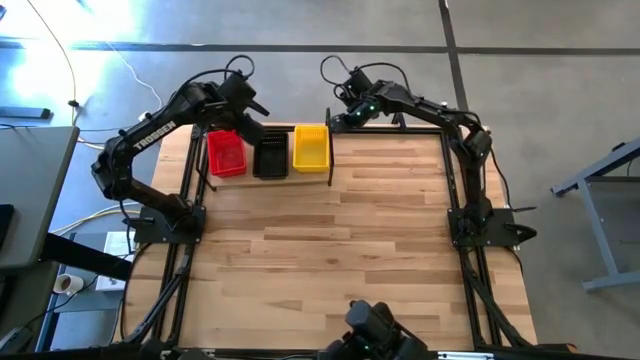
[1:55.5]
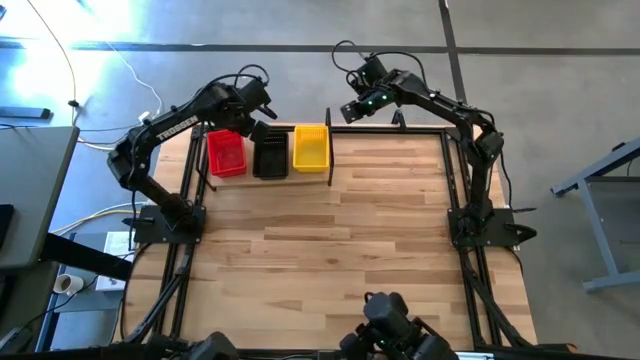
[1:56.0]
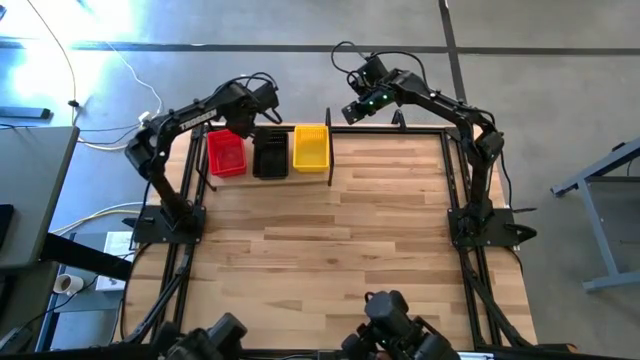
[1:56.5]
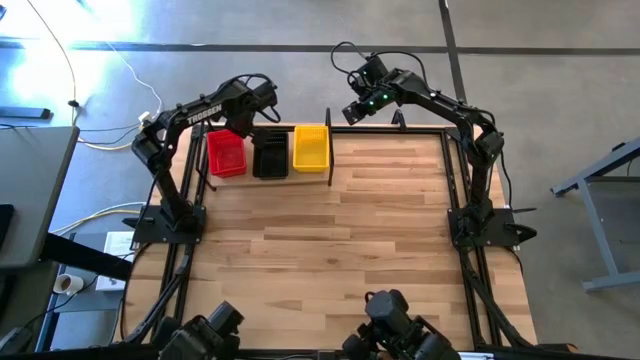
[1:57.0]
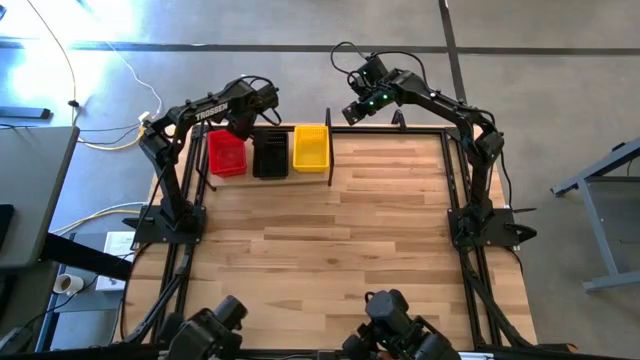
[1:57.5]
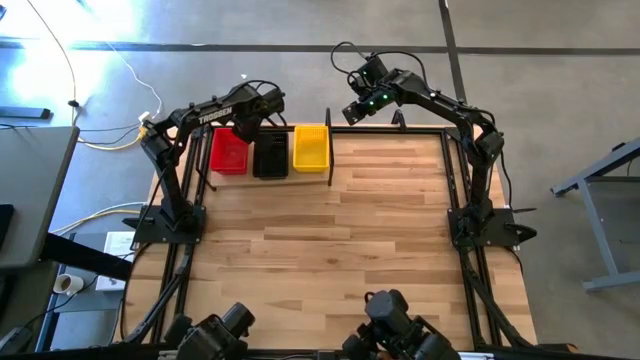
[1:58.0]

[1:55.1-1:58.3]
Task: Stack baskets on shelf by color
Adjust the stacked red bins on the shelf

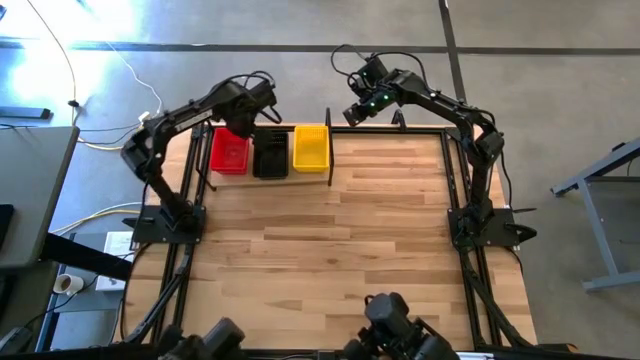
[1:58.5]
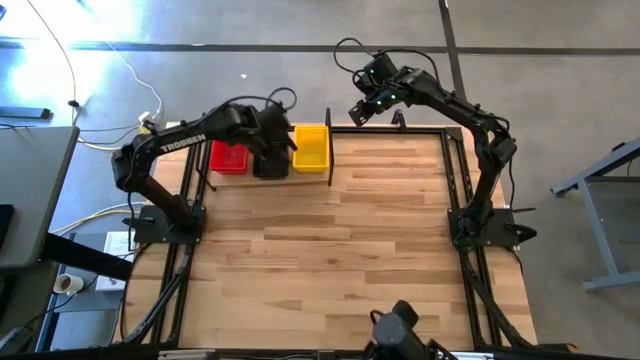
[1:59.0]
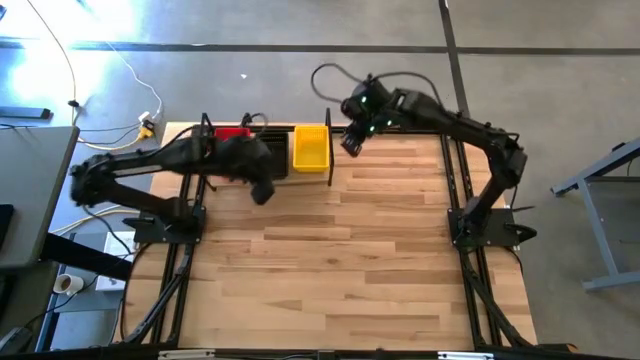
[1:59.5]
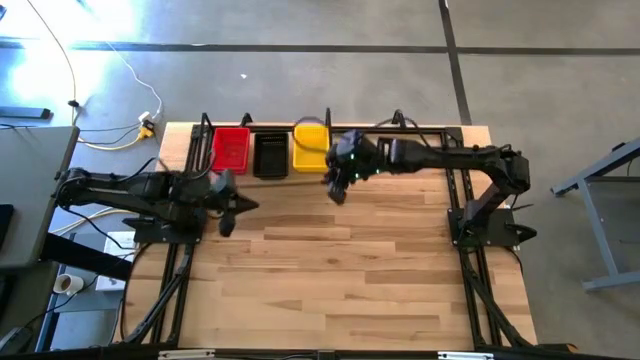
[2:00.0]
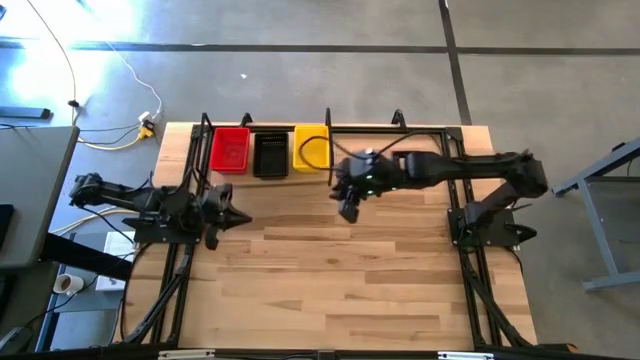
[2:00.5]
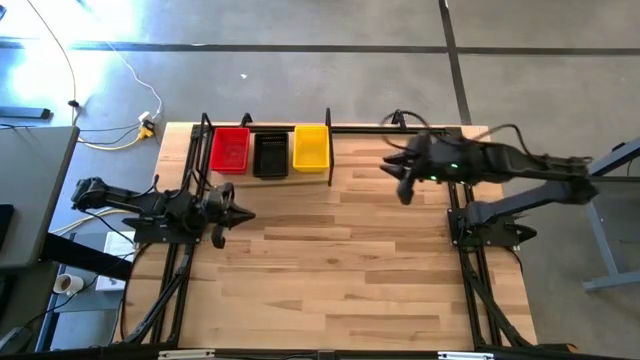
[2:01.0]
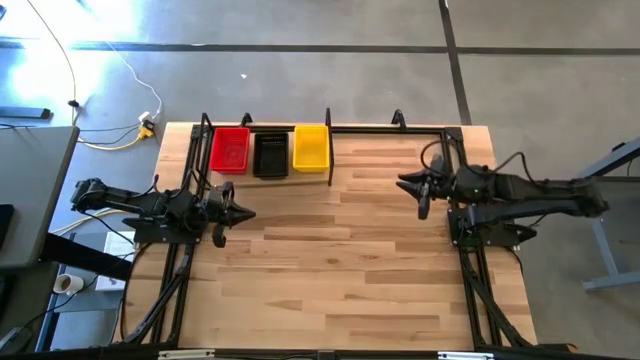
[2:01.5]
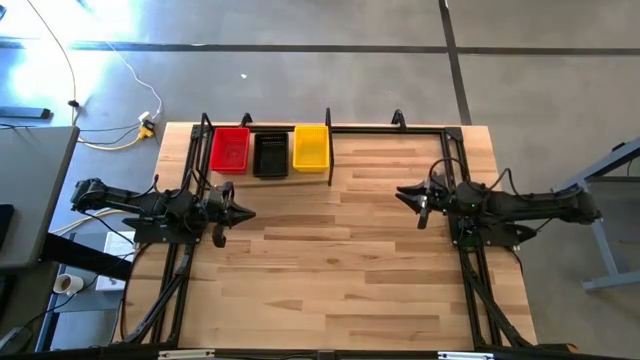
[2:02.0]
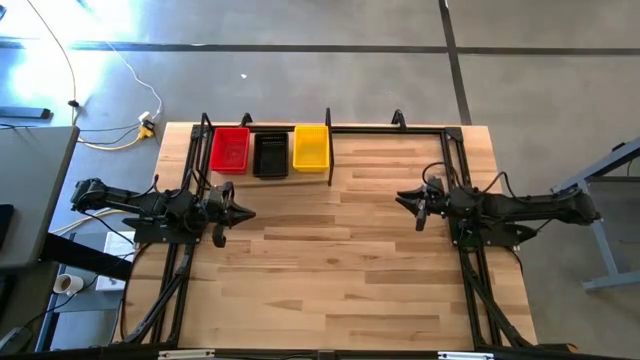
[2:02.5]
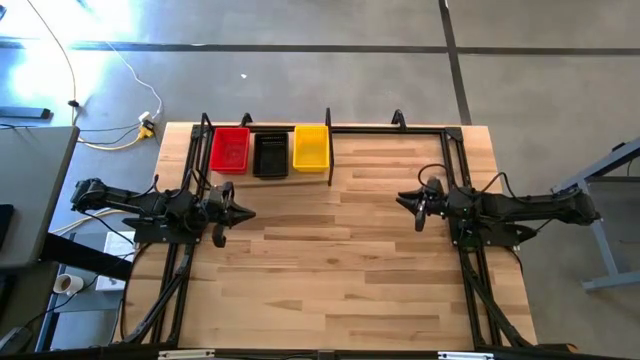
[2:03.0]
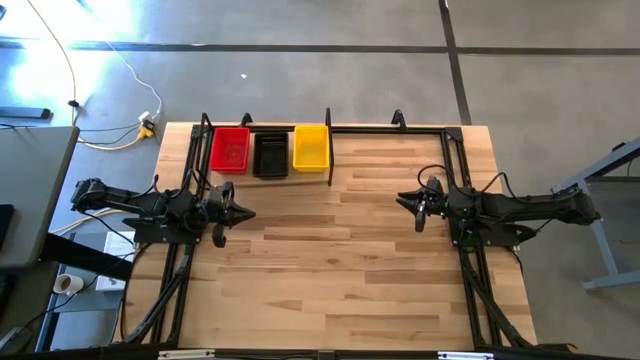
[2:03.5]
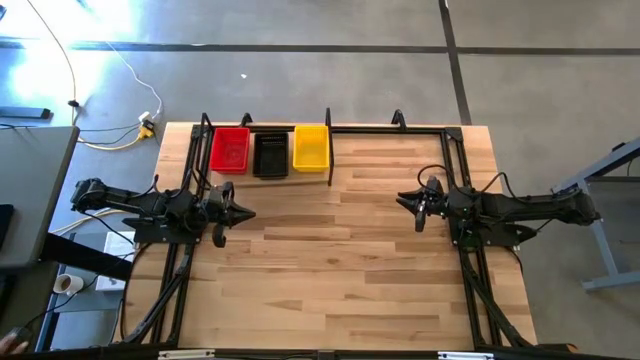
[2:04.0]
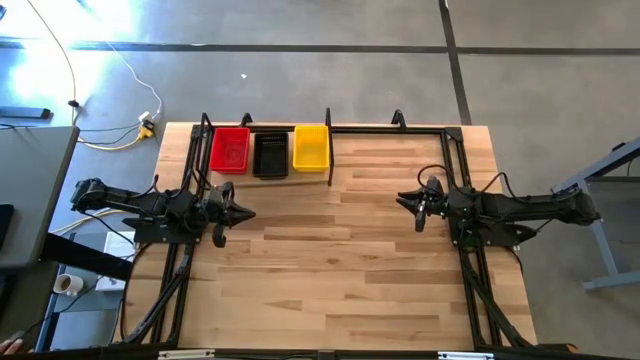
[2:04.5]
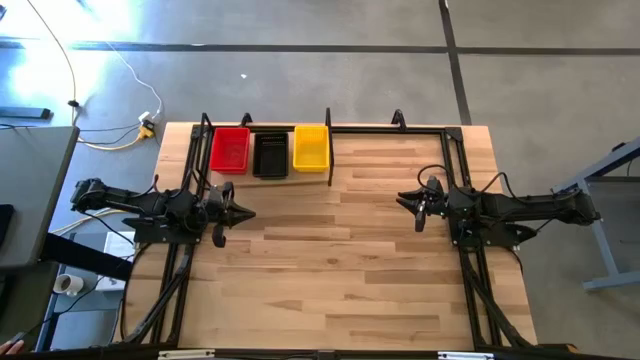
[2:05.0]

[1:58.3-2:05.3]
Return to Home Position

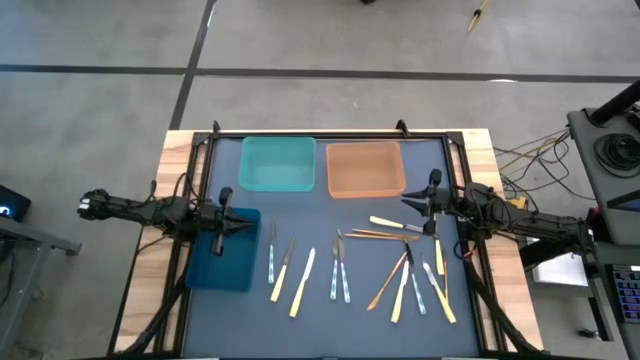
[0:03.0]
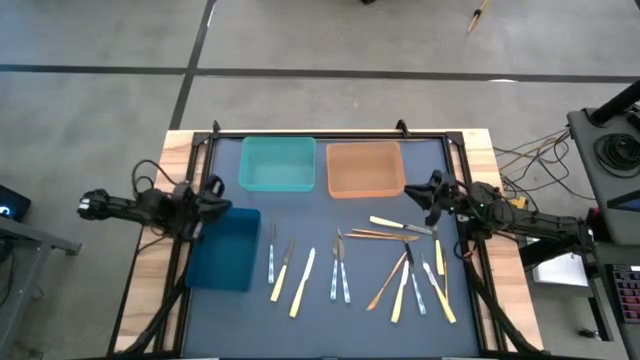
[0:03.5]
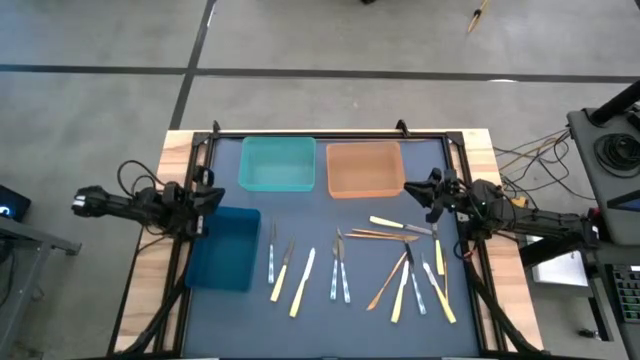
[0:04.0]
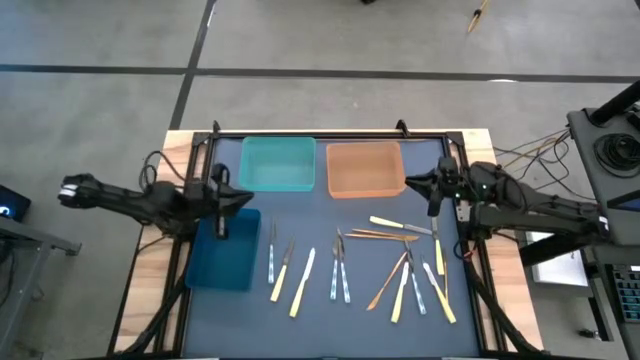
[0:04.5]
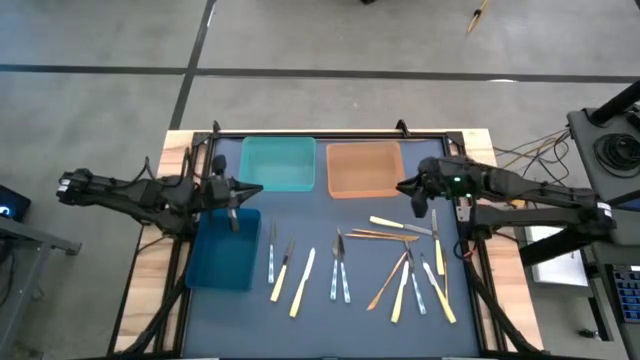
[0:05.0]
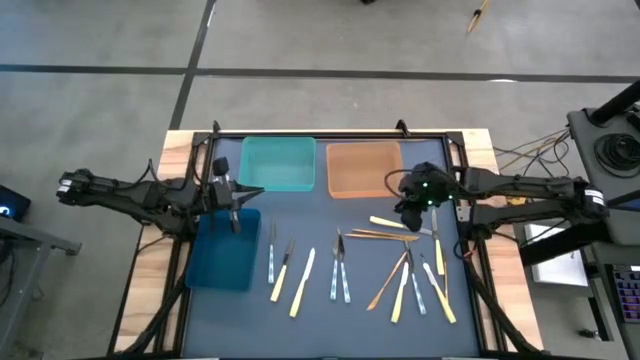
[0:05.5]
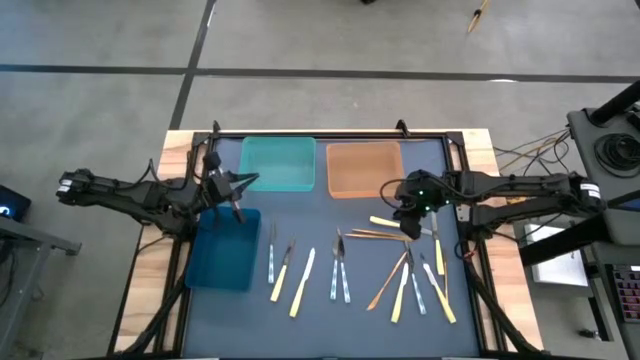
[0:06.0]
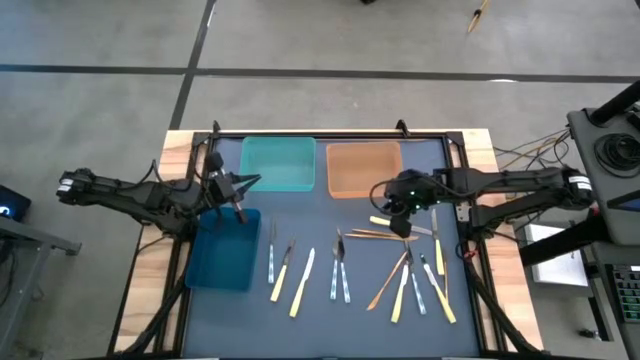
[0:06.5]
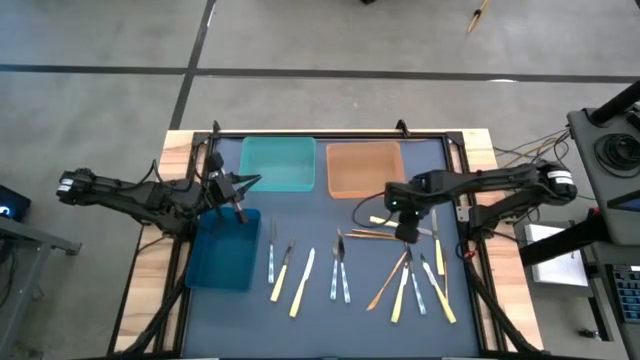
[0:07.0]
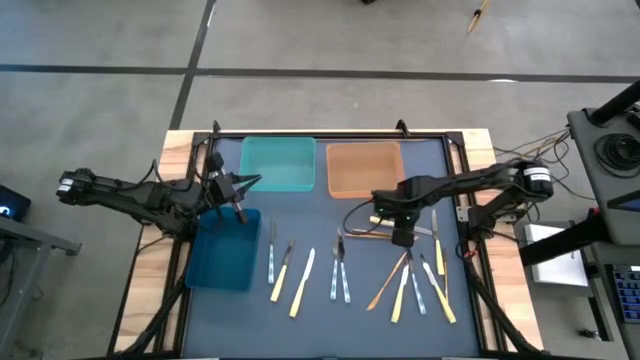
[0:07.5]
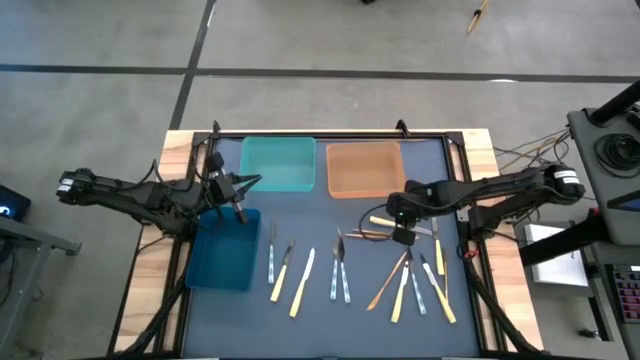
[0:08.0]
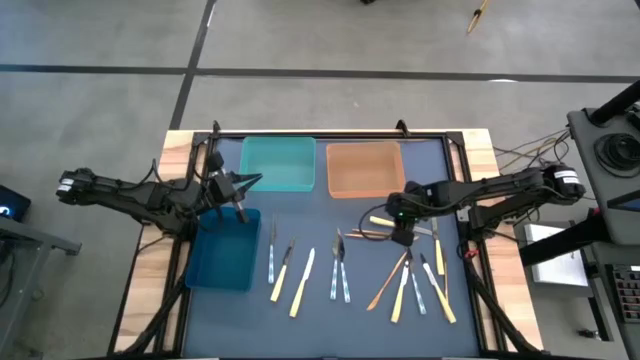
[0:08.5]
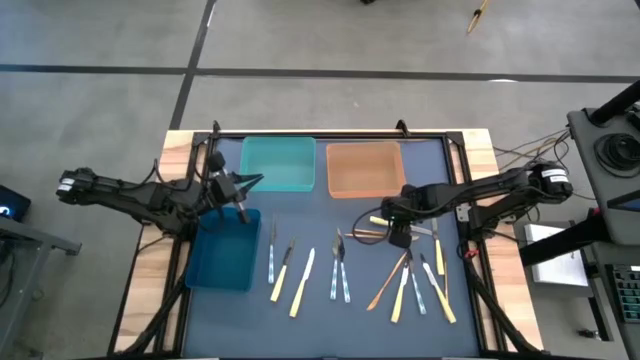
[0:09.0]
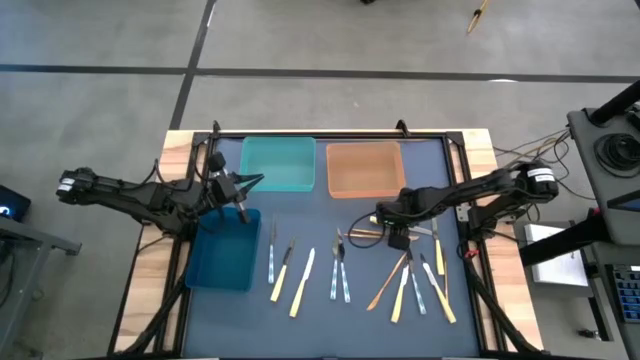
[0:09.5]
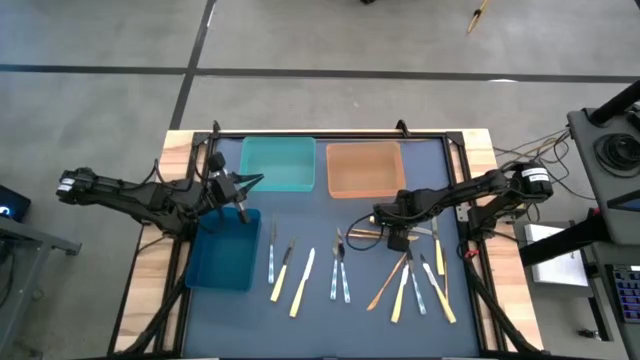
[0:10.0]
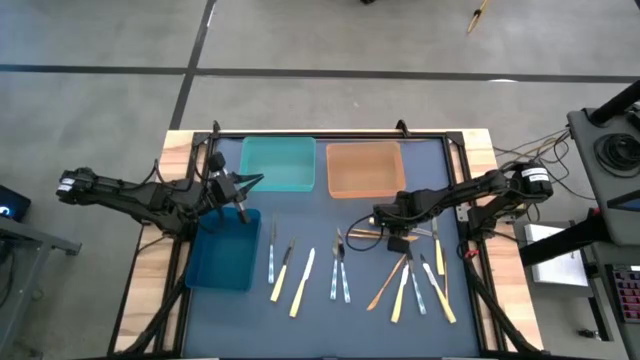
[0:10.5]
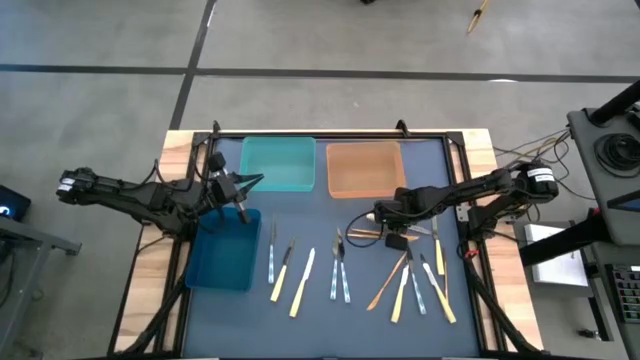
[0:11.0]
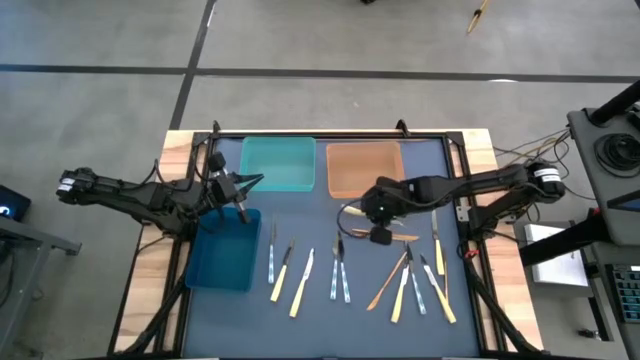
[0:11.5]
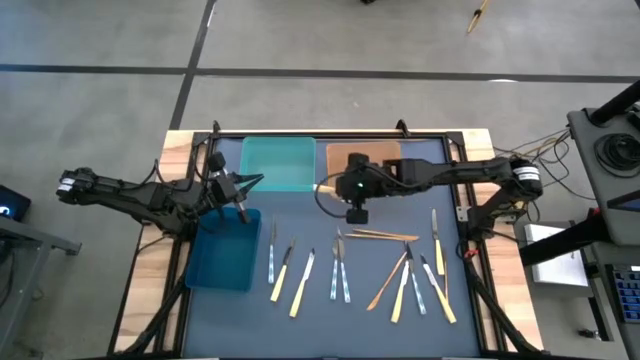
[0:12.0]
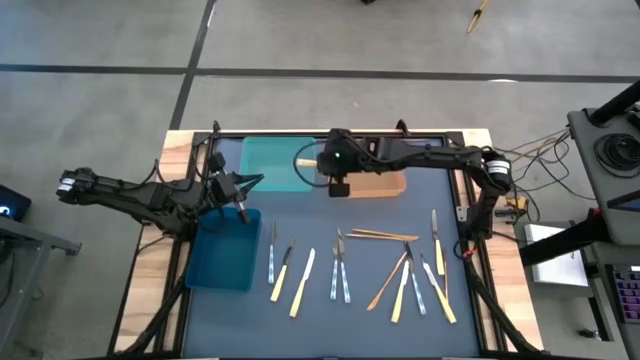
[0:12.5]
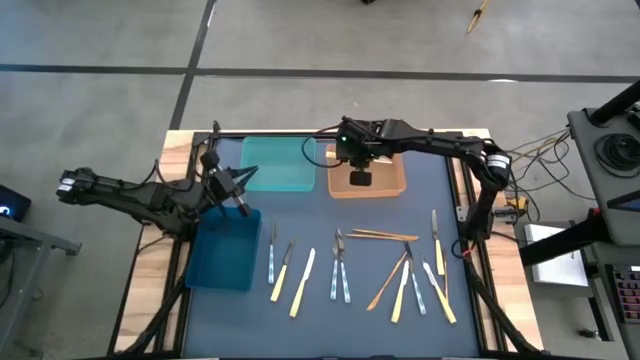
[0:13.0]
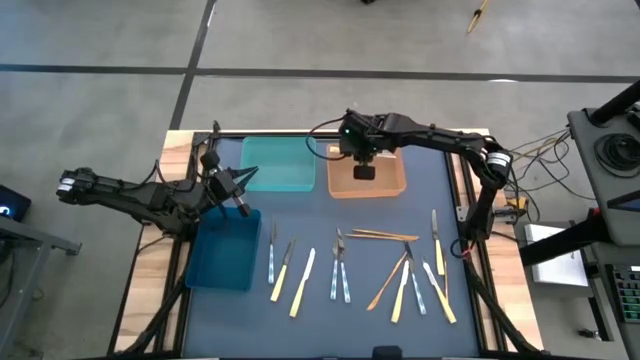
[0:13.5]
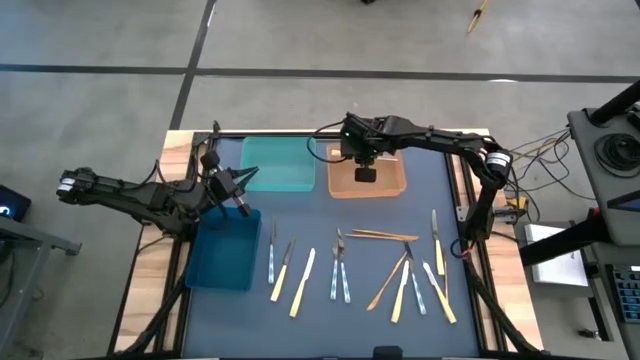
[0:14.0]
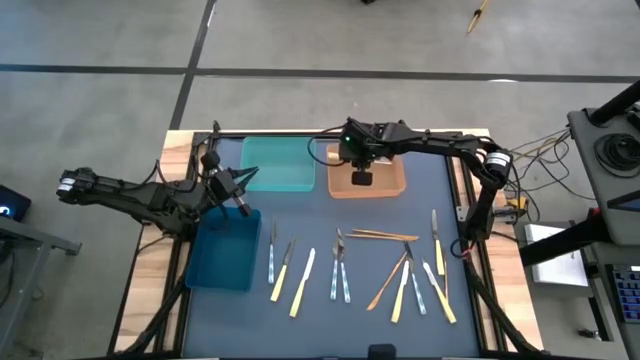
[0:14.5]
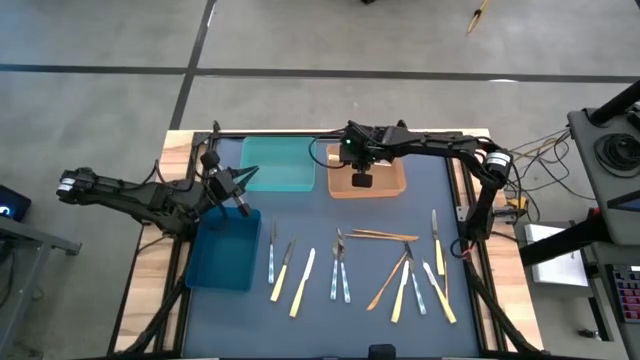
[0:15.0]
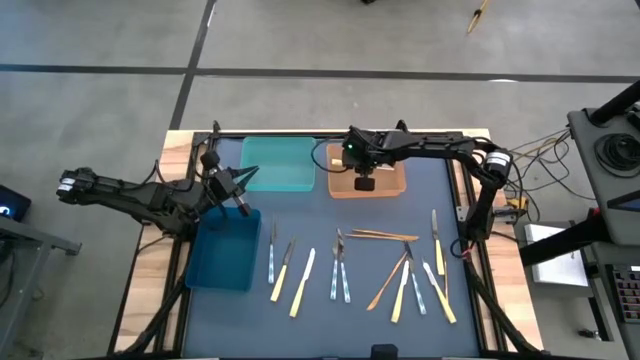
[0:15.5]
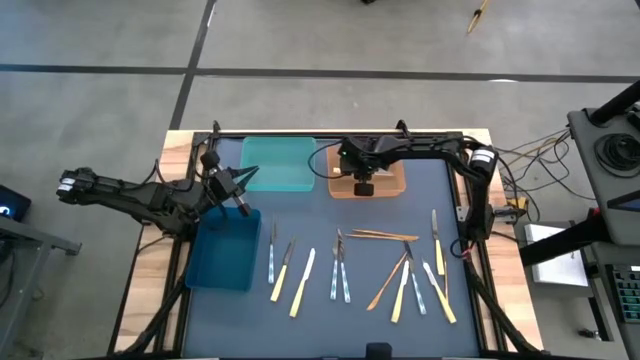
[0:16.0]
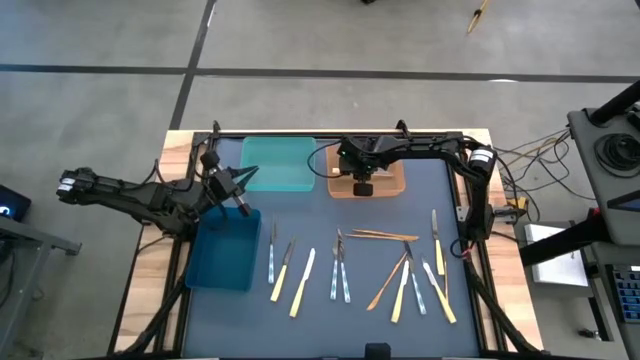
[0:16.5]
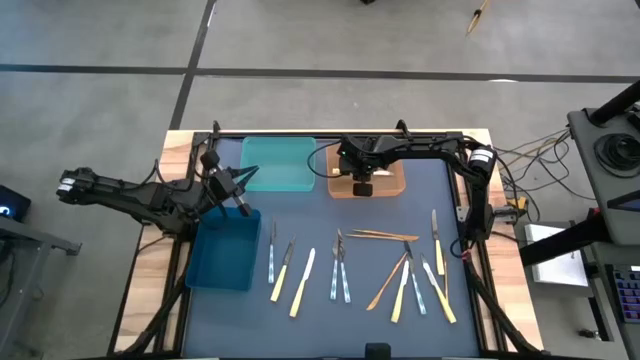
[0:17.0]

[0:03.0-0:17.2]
Task: Sort silverware by color (type)
Put the light yellow knife into the blue bin
